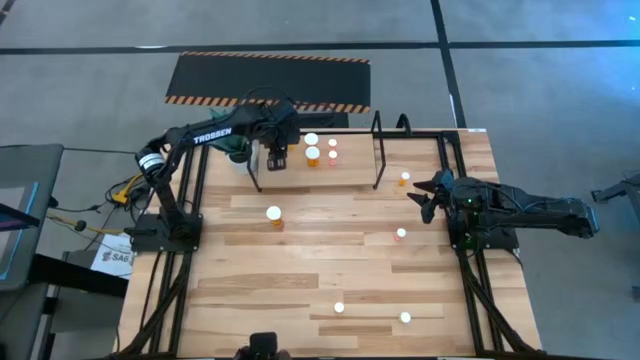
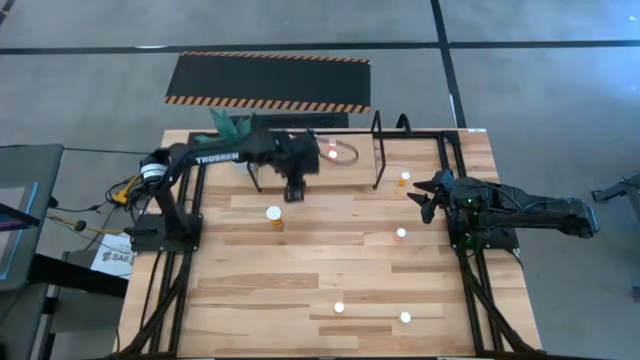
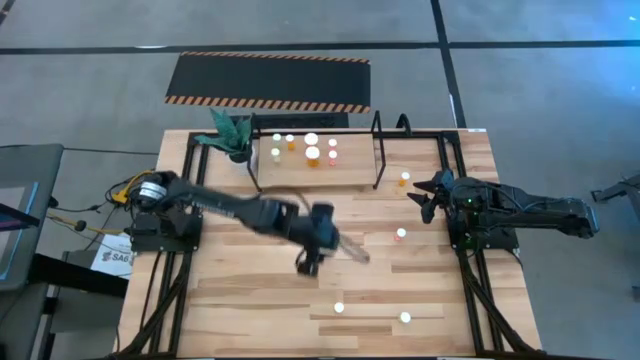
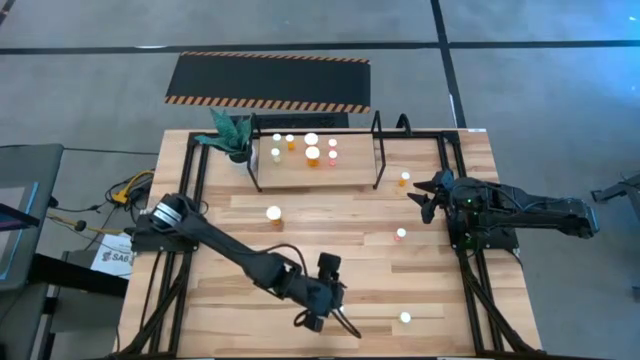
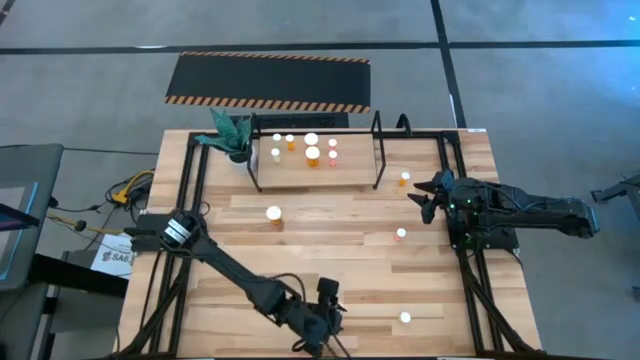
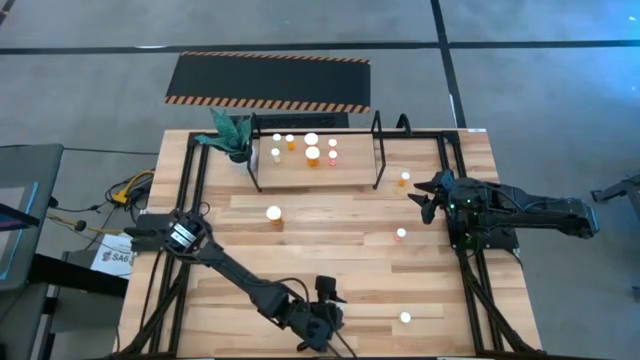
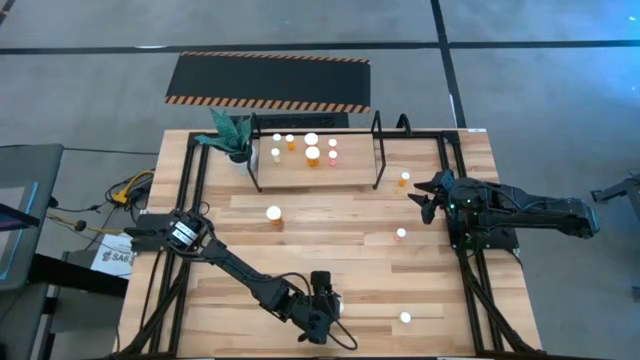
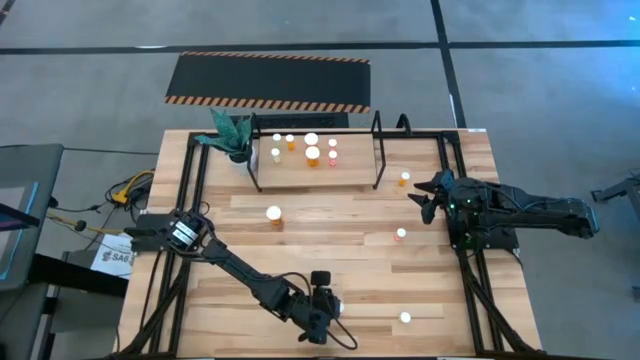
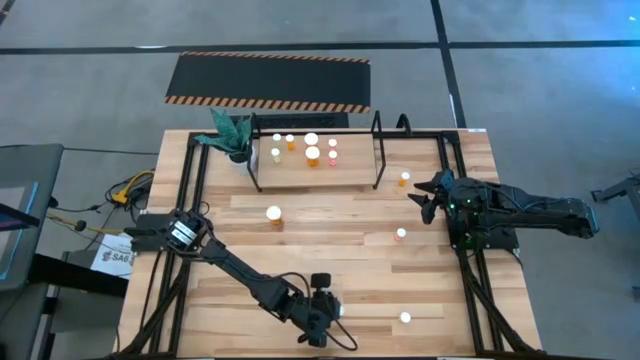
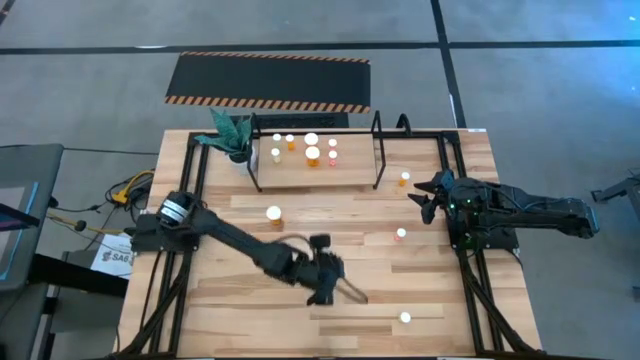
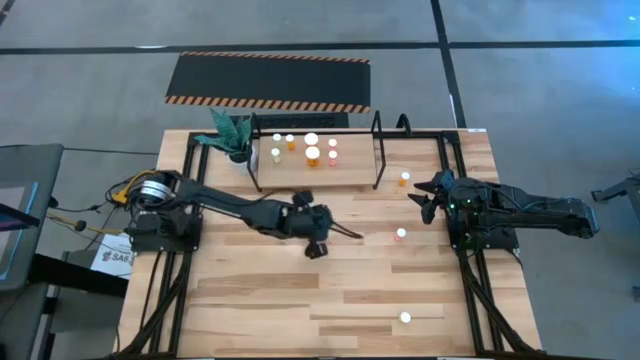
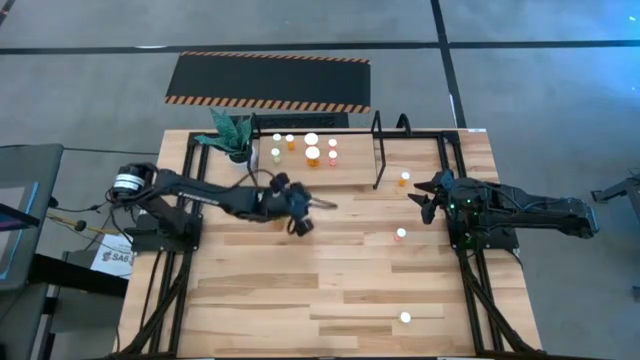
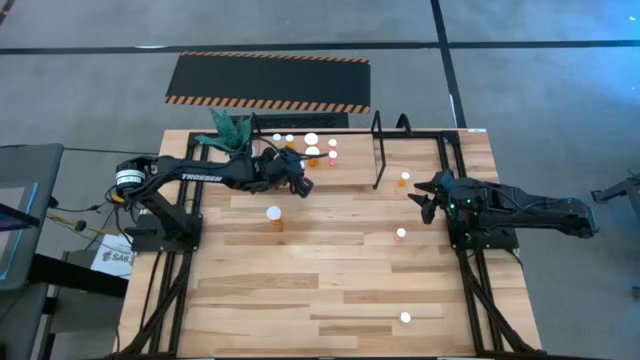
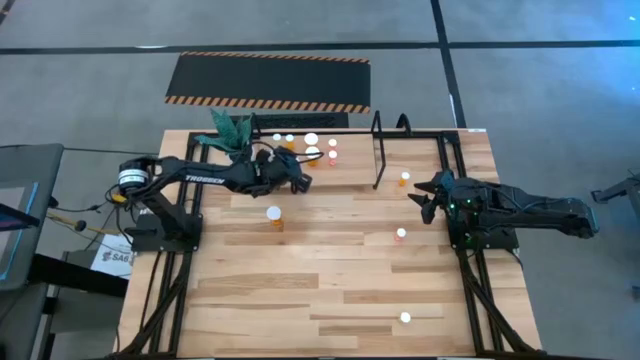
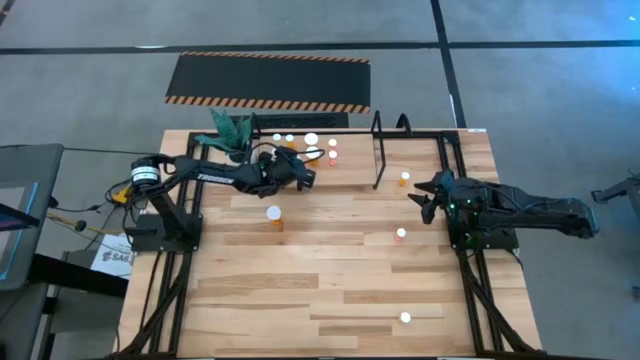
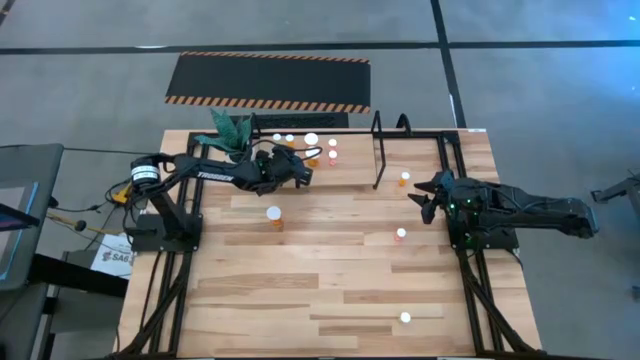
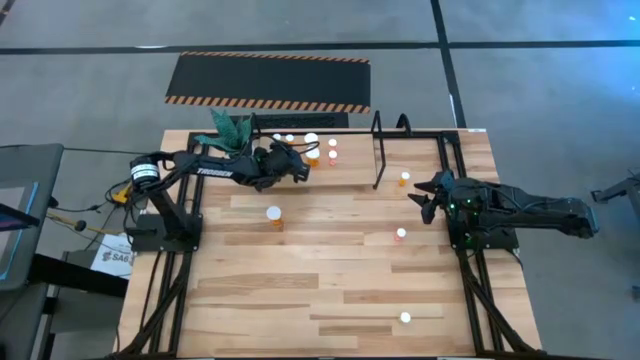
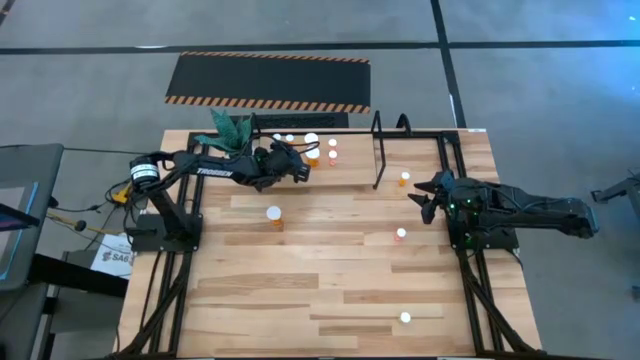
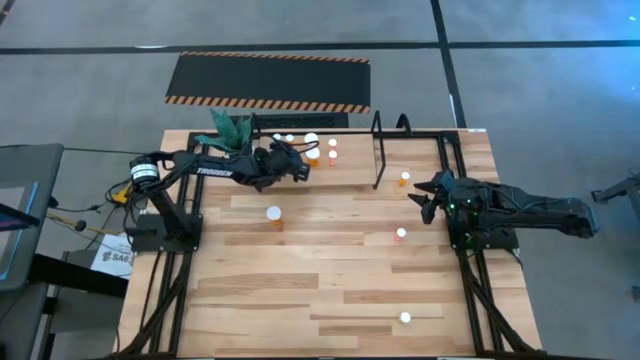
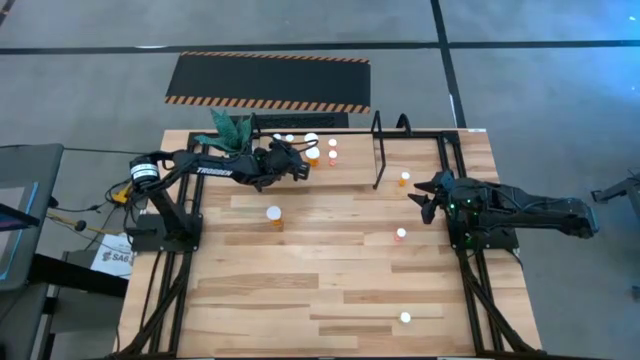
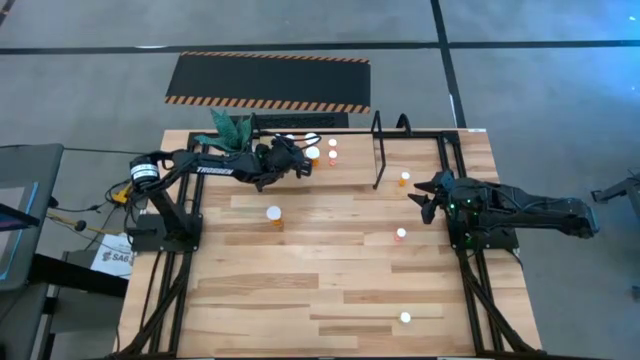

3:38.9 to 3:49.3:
Task: Pick and place medicine bottles onto shelf by color
Put the bottom small orange pill bottle on the shelf aligned with the small orange pill bottle
